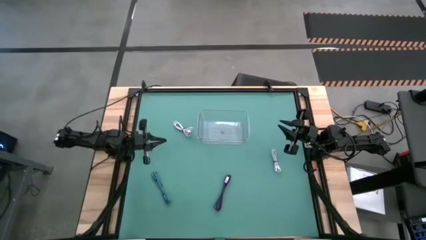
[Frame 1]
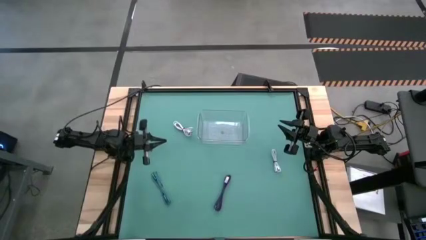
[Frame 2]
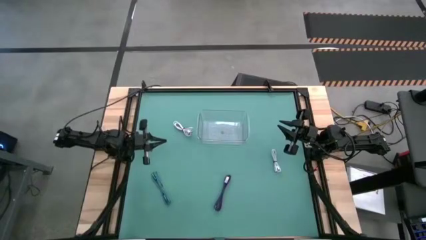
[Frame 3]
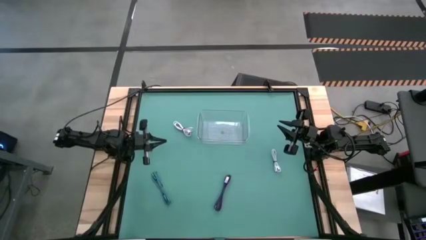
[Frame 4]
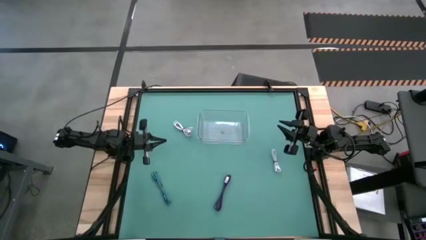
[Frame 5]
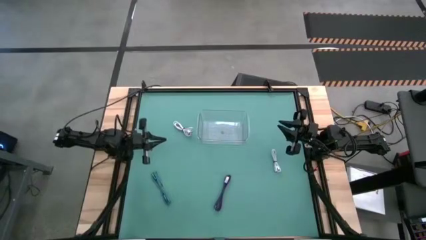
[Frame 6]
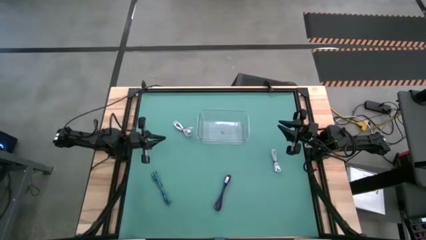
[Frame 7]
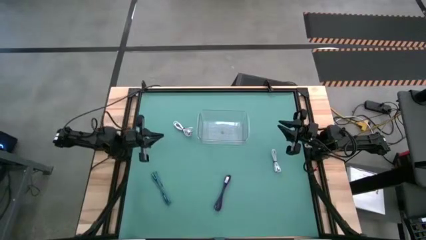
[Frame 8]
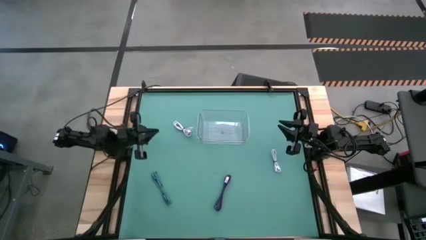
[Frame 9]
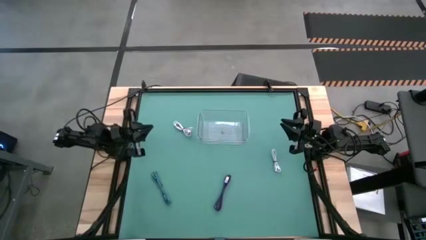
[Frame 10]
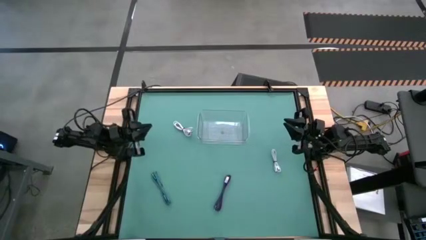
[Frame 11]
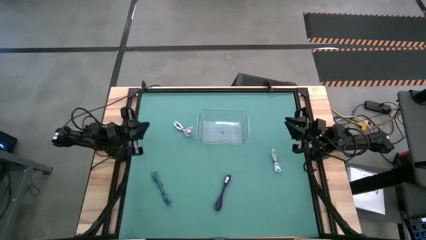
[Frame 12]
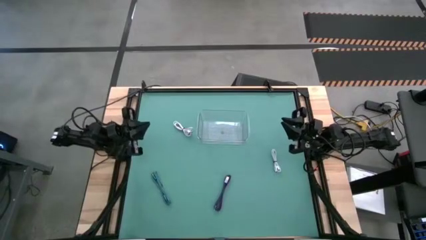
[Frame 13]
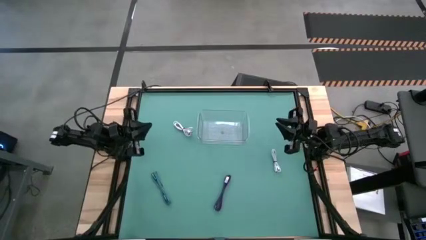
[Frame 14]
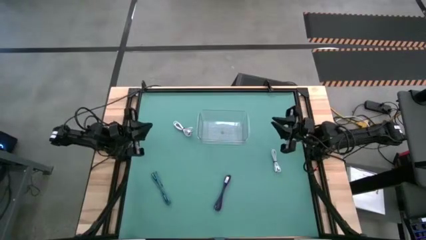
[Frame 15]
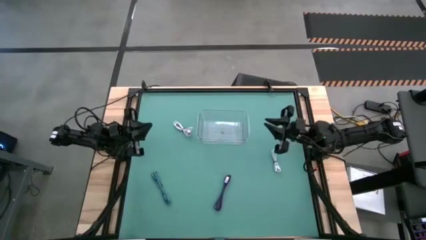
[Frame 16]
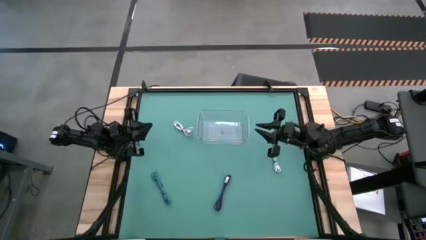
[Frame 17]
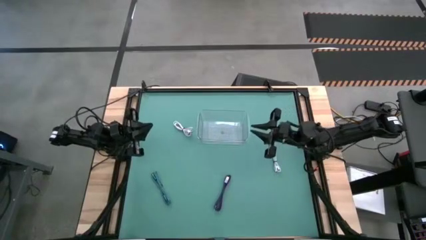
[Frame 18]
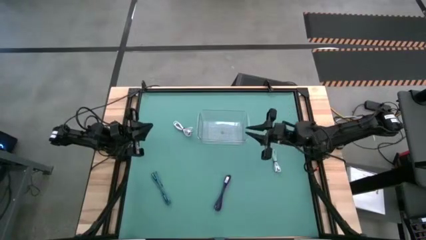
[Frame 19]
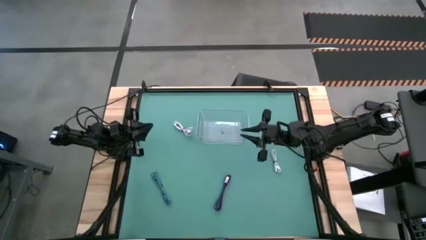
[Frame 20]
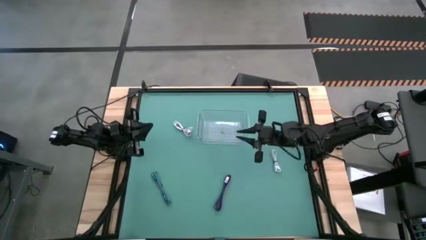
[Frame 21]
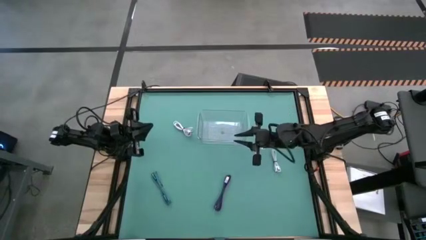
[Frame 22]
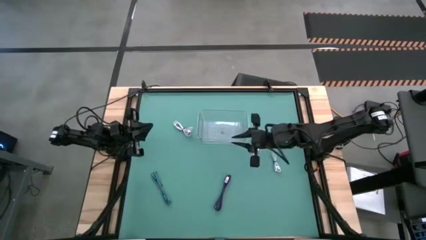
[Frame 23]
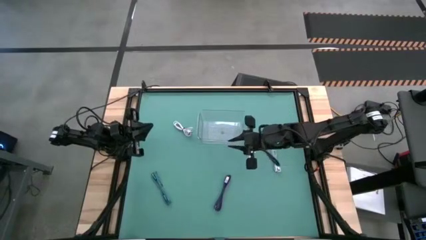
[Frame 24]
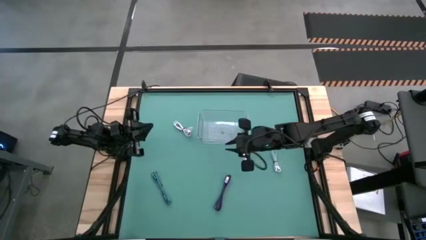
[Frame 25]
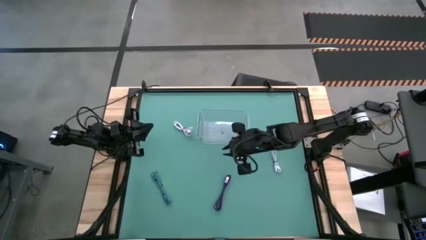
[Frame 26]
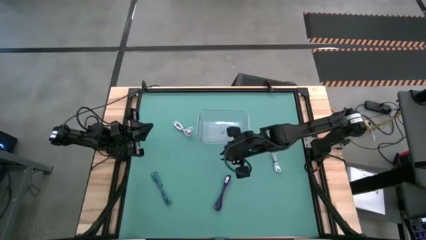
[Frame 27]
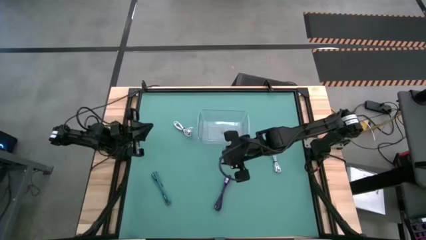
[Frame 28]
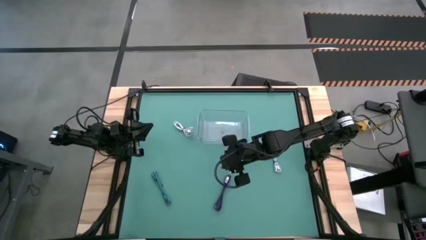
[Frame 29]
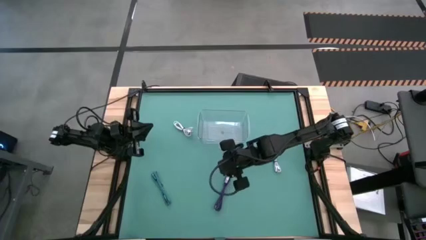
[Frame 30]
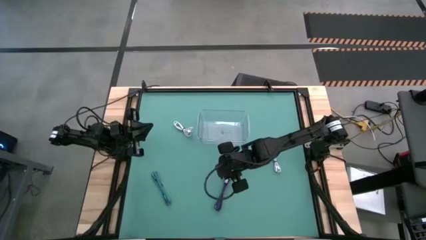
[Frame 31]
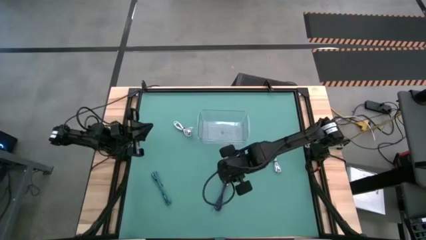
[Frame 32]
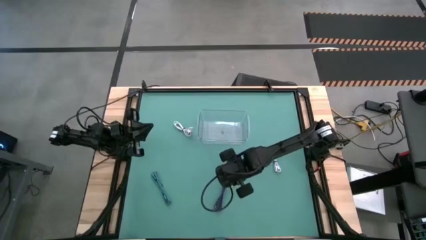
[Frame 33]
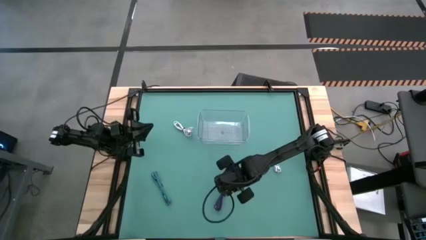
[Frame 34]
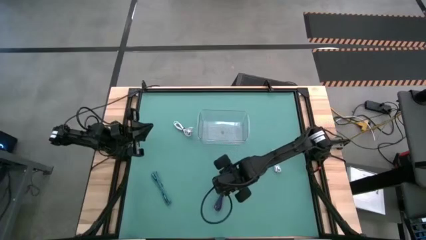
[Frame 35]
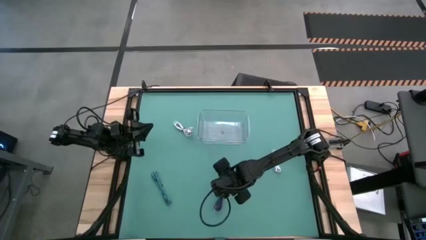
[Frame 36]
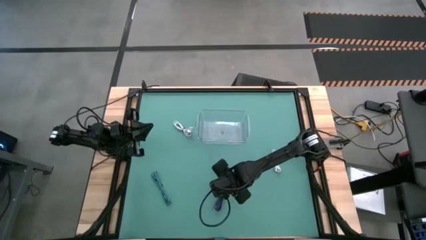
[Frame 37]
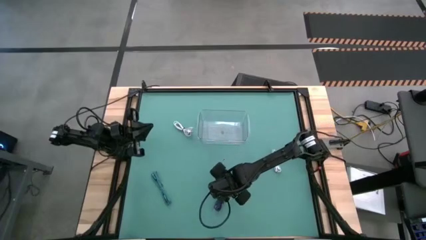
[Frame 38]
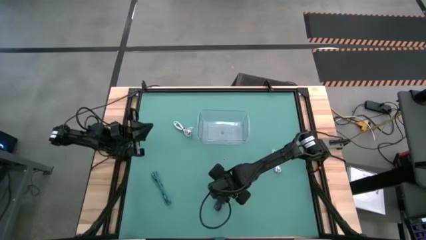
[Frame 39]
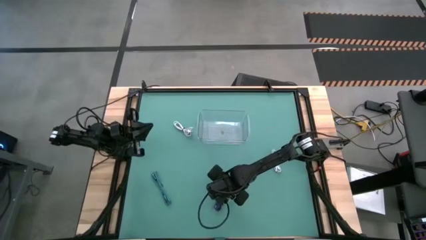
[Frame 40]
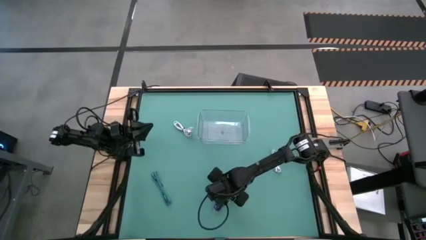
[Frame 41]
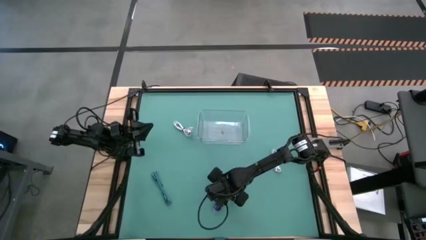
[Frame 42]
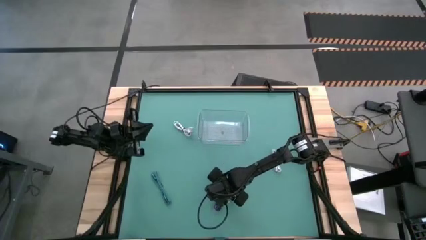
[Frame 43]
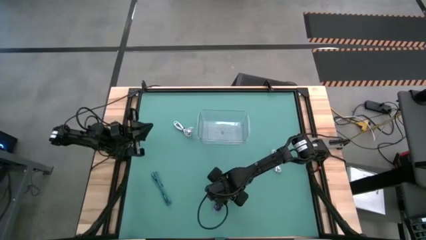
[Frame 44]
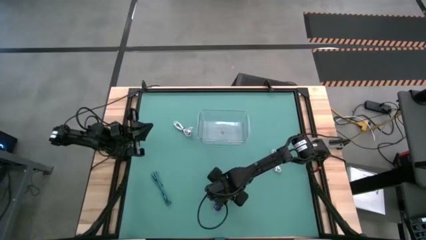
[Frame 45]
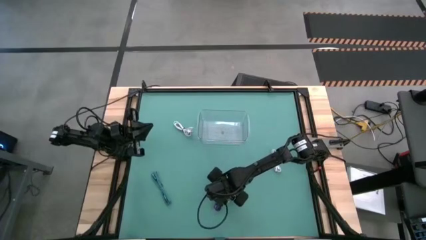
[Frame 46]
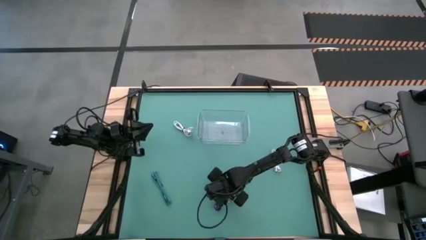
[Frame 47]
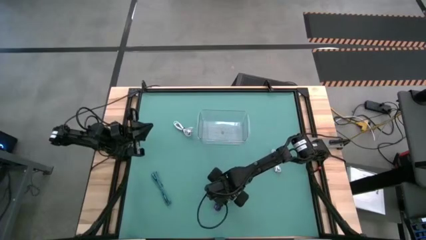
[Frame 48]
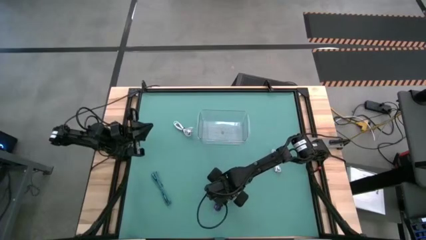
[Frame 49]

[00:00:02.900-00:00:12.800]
Task: Pick and place USB-C Cables
Put the purple charger cable into the transparent container

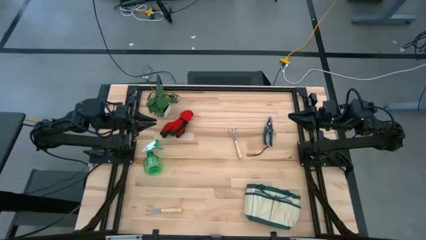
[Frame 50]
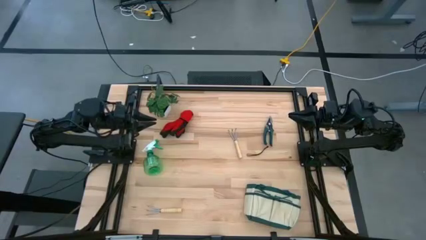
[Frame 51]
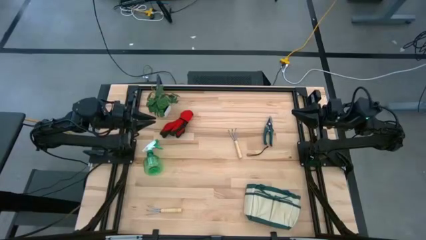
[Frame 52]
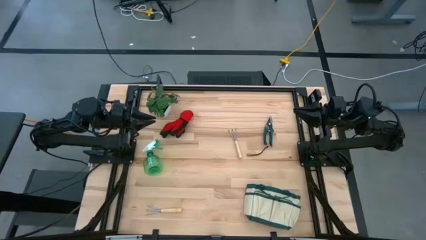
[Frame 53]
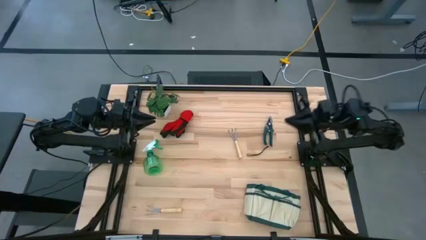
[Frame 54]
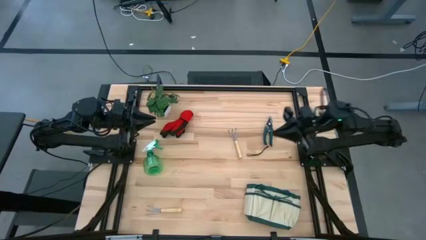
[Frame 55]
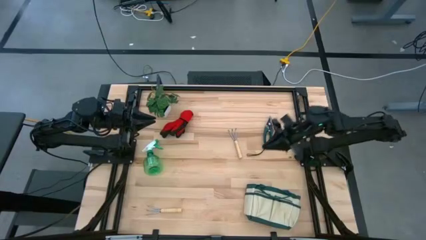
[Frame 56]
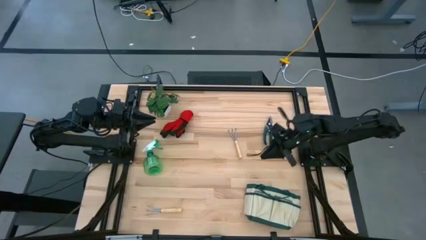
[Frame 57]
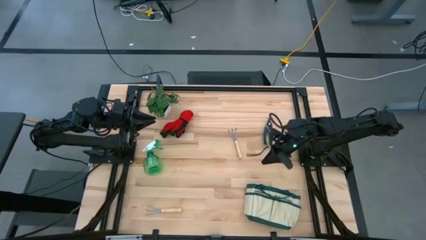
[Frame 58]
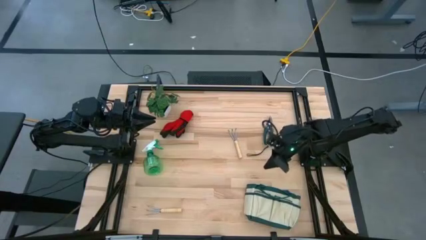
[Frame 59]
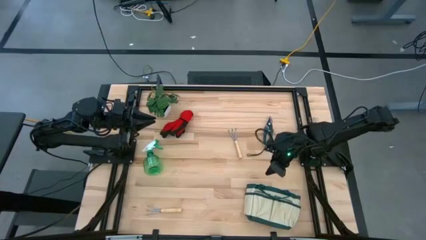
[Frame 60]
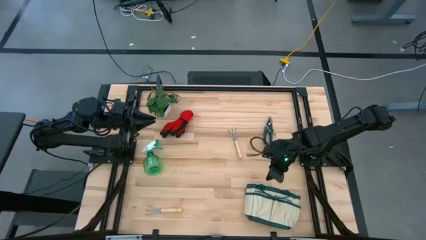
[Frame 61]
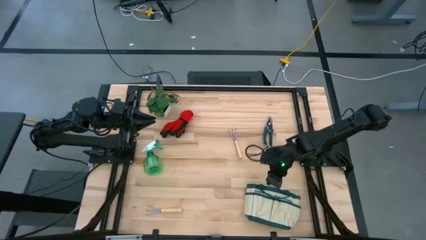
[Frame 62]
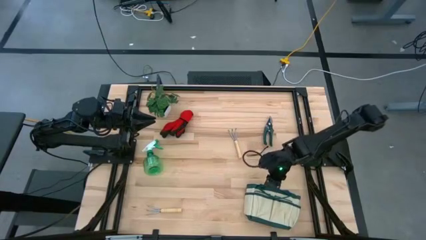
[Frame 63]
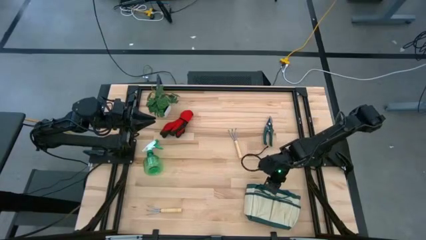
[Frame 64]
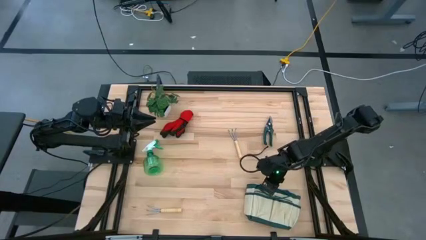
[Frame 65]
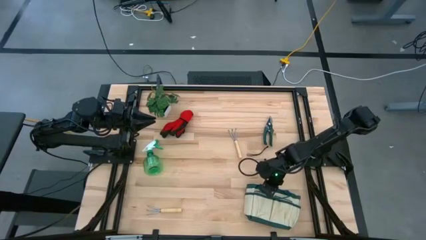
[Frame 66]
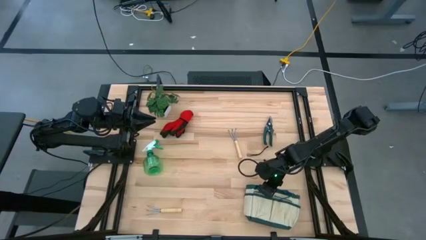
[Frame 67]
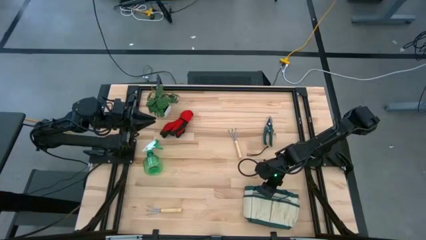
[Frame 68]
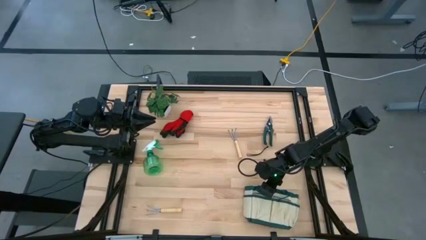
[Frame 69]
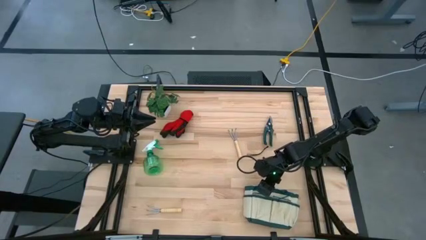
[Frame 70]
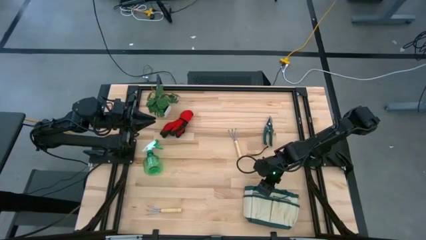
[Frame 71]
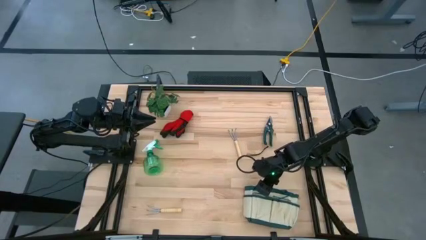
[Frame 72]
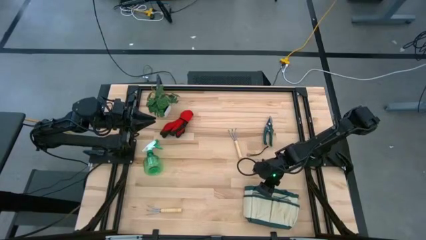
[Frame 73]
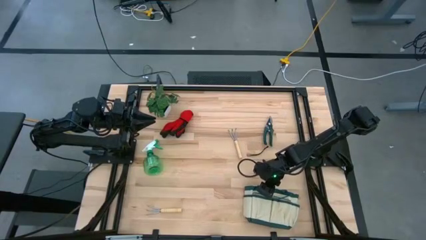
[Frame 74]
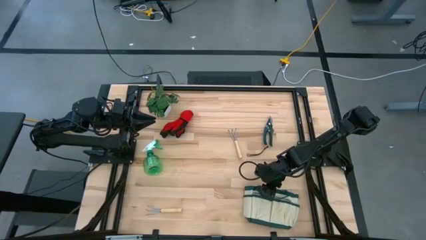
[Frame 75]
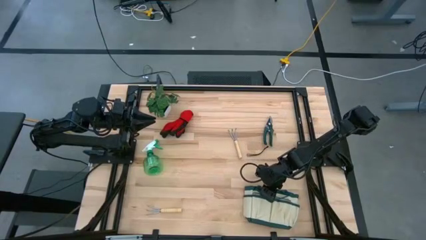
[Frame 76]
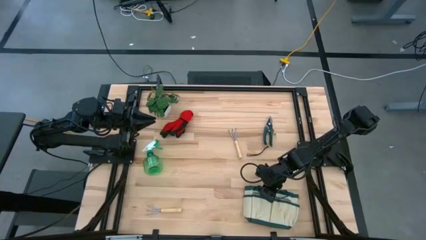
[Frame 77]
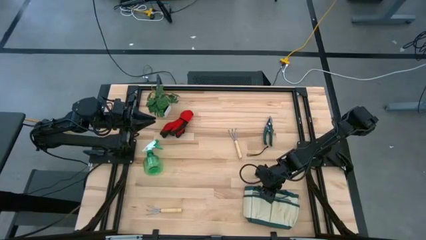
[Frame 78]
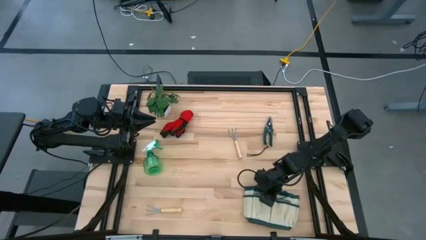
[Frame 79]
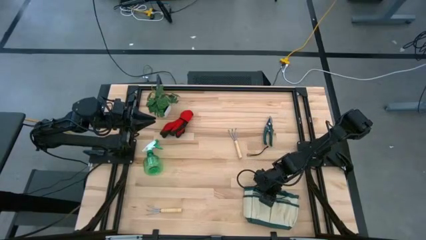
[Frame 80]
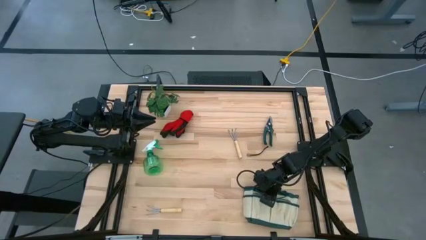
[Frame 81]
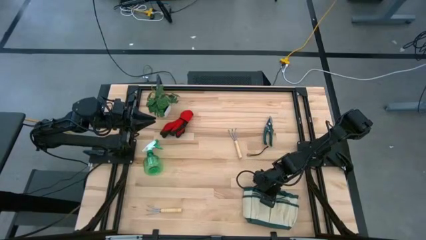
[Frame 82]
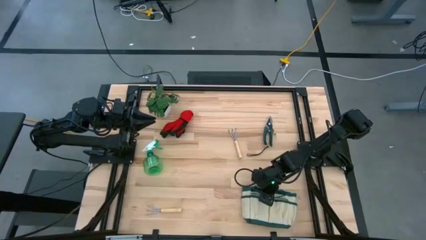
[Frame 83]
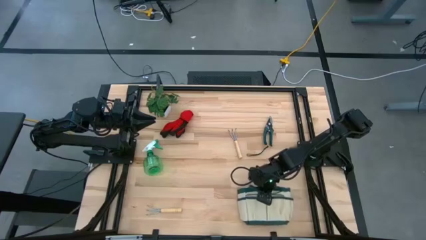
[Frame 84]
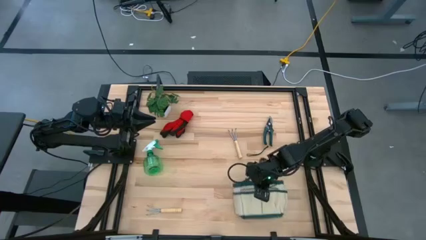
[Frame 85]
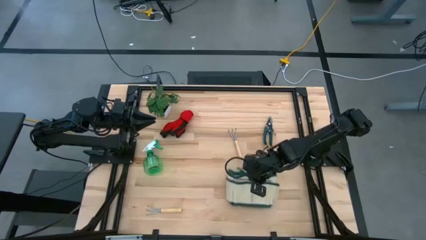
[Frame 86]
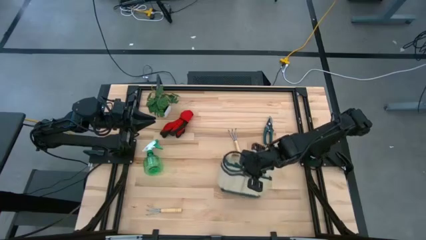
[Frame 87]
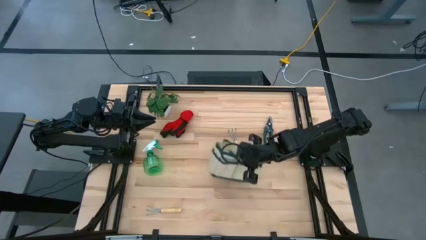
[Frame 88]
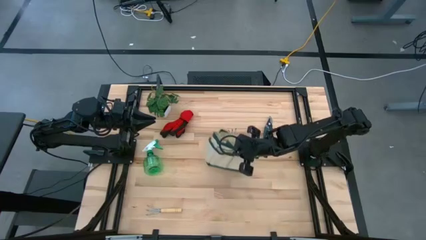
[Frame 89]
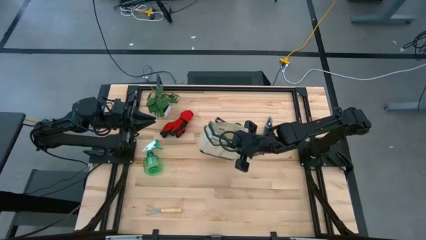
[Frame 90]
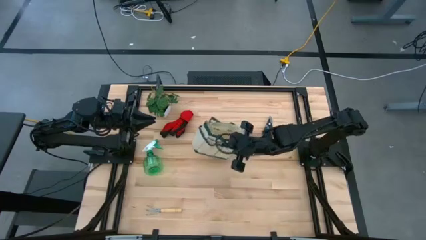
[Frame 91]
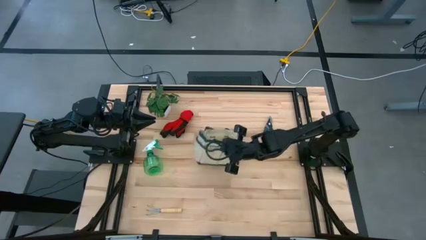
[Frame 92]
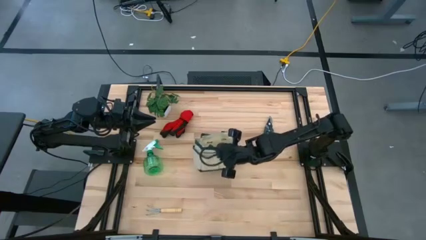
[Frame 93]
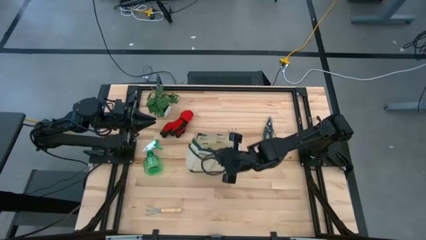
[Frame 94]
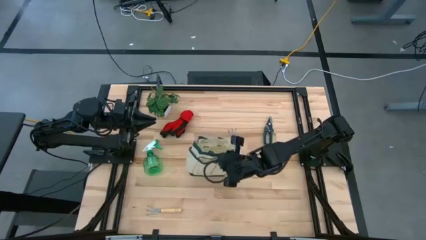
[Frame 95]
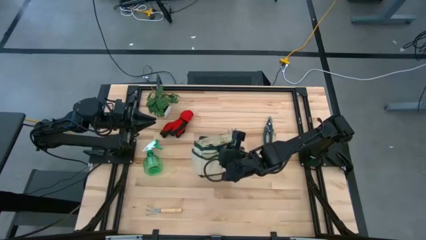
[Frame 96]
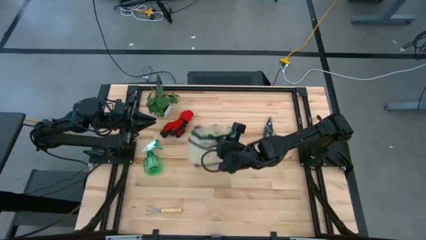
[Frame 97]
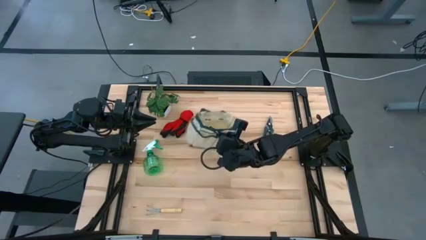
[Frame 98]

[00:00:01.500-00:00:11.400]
Task: Pick & Place Garden tools in Gardening bag
Prepare the gardening bag
